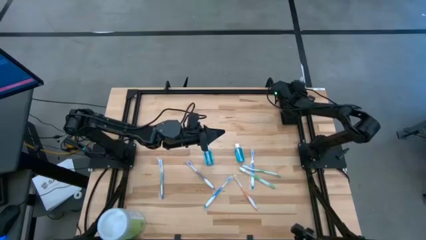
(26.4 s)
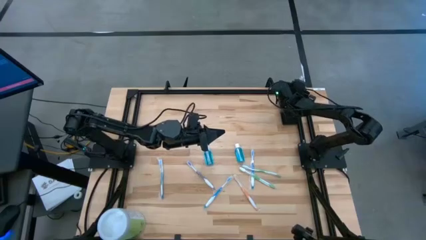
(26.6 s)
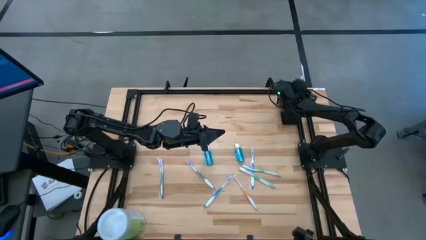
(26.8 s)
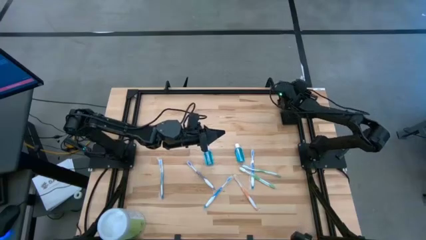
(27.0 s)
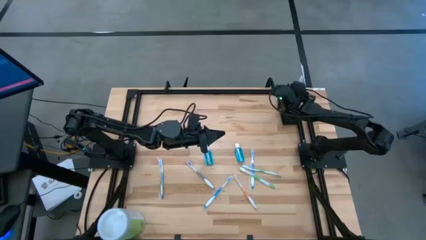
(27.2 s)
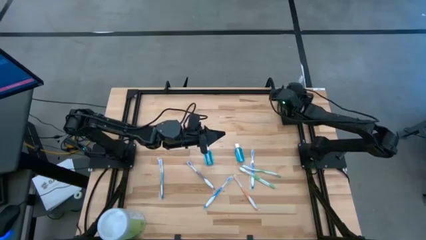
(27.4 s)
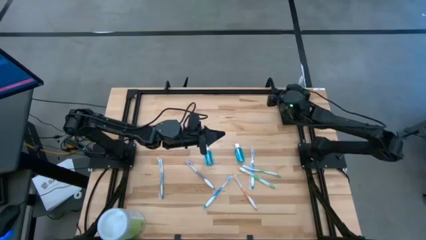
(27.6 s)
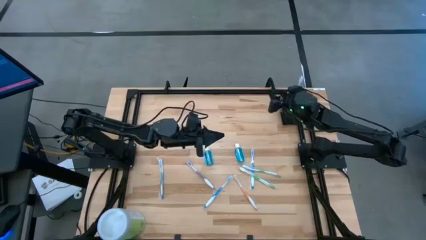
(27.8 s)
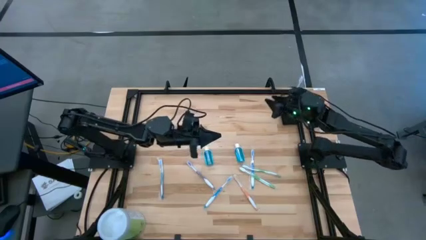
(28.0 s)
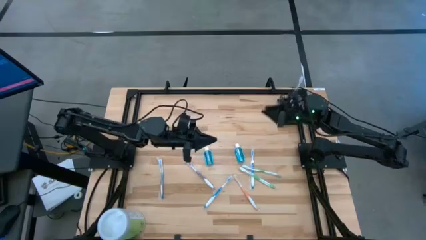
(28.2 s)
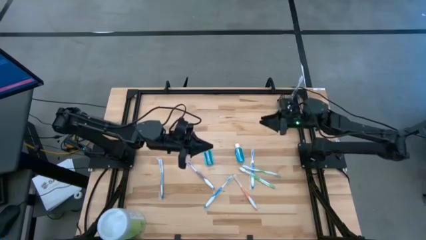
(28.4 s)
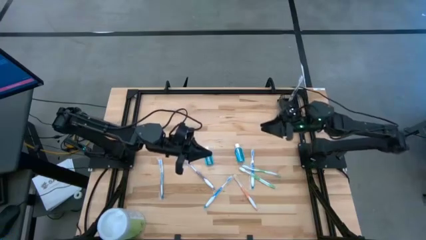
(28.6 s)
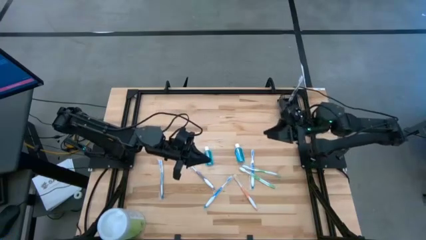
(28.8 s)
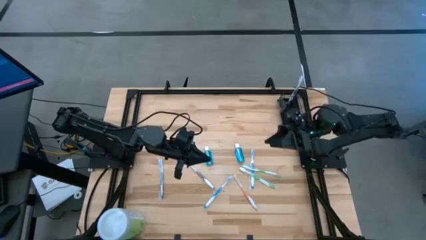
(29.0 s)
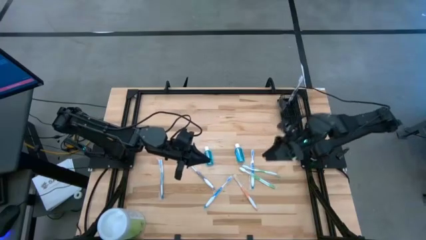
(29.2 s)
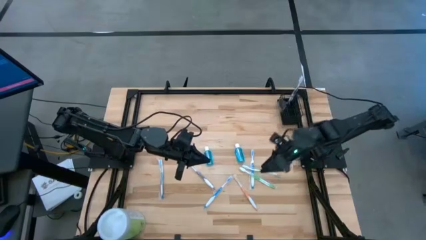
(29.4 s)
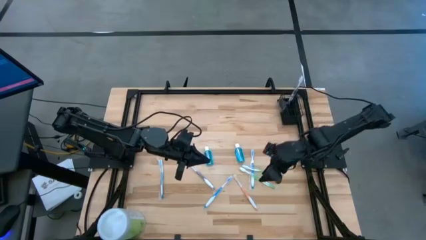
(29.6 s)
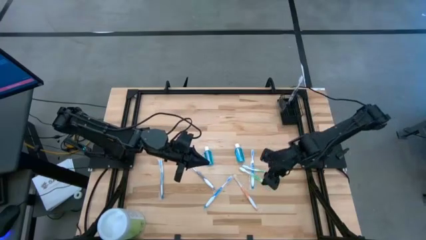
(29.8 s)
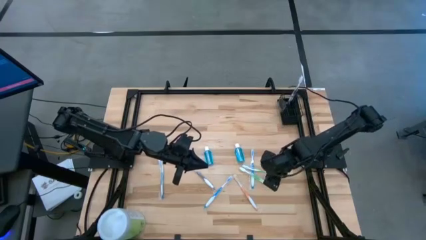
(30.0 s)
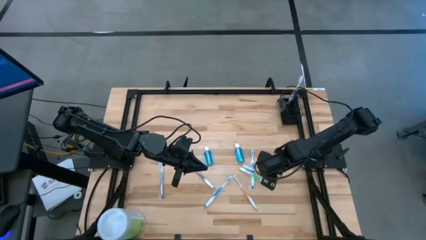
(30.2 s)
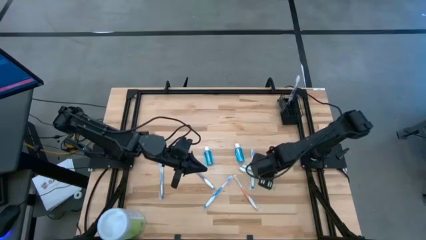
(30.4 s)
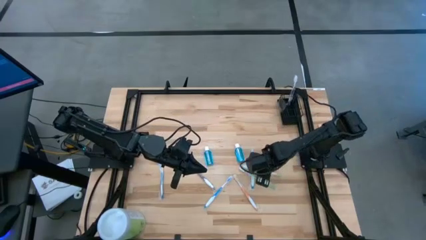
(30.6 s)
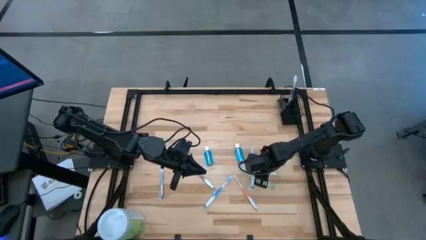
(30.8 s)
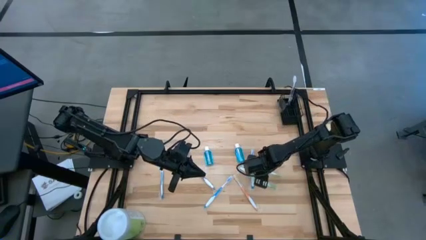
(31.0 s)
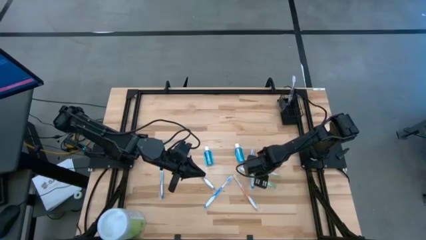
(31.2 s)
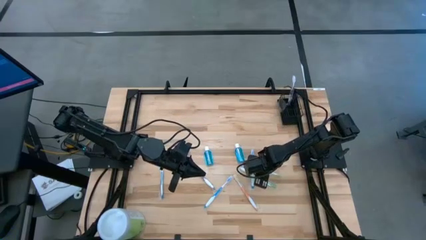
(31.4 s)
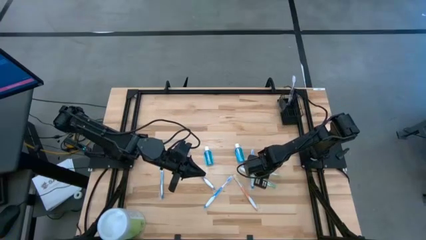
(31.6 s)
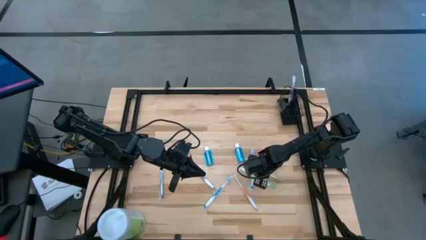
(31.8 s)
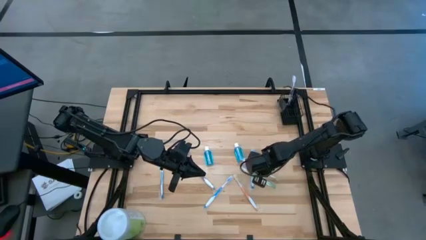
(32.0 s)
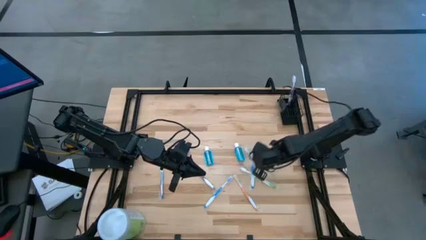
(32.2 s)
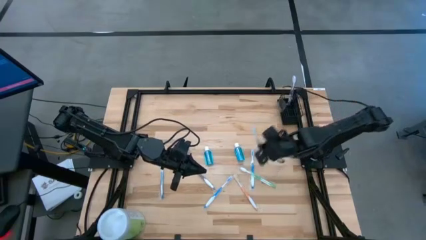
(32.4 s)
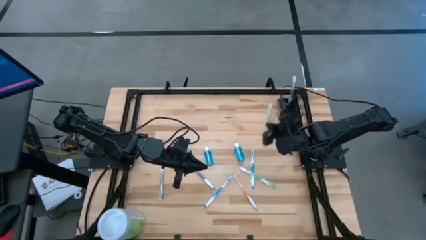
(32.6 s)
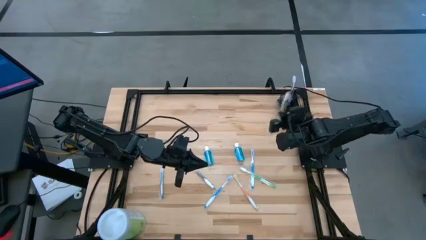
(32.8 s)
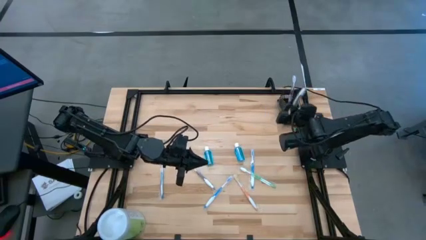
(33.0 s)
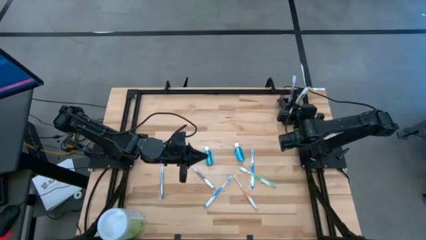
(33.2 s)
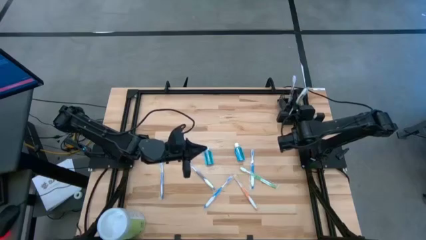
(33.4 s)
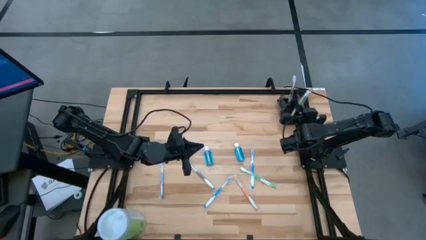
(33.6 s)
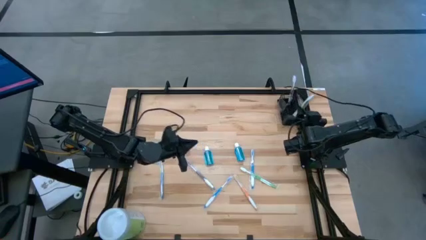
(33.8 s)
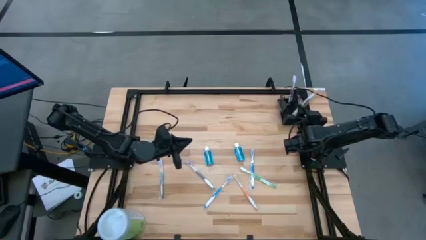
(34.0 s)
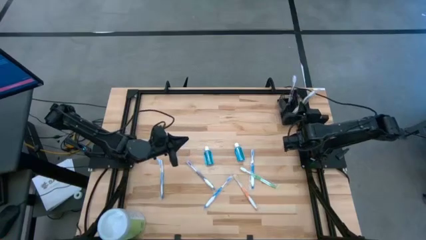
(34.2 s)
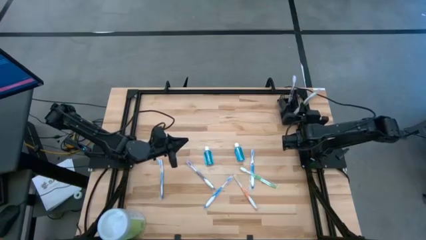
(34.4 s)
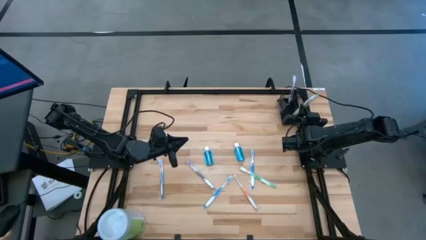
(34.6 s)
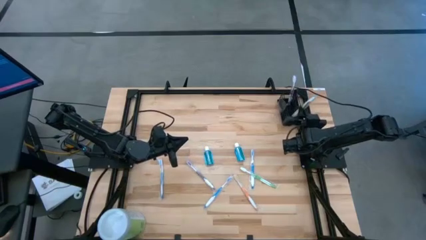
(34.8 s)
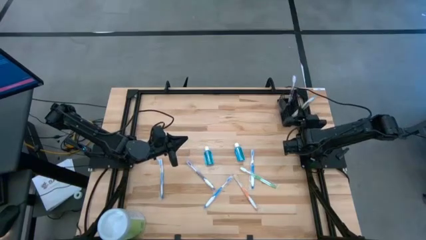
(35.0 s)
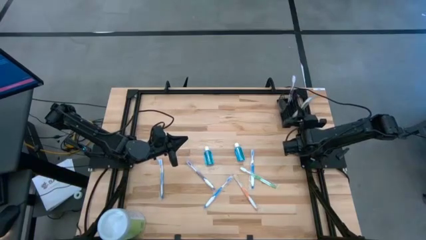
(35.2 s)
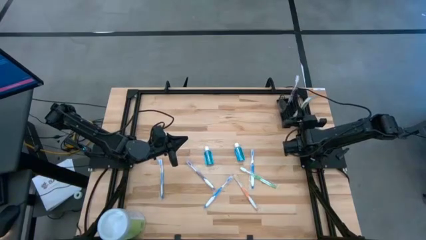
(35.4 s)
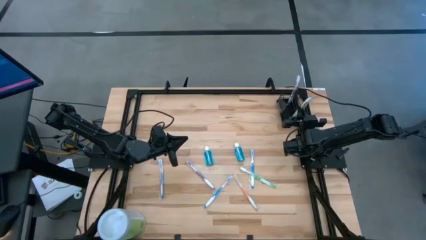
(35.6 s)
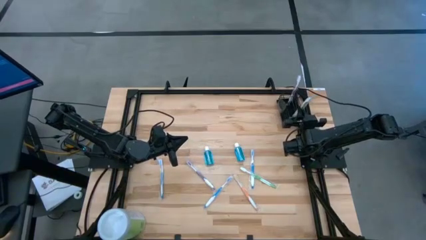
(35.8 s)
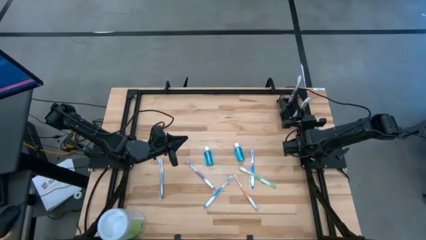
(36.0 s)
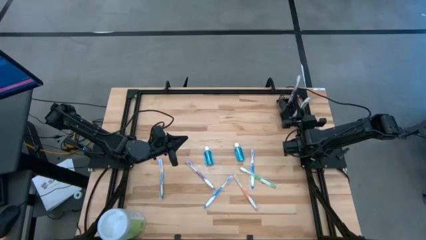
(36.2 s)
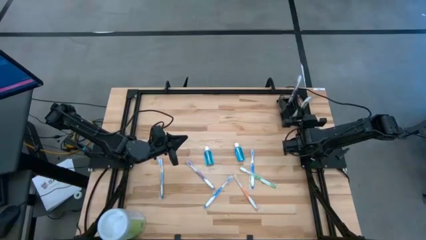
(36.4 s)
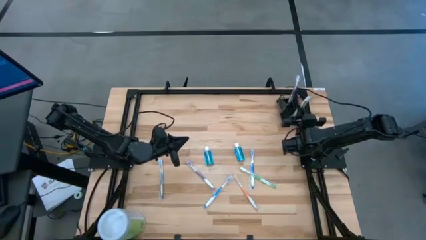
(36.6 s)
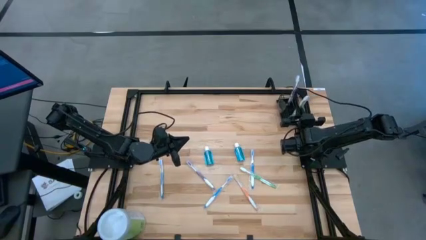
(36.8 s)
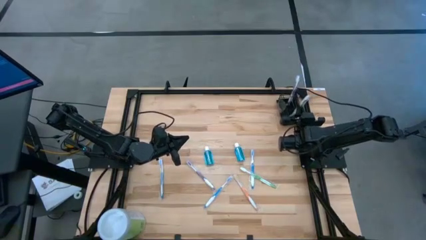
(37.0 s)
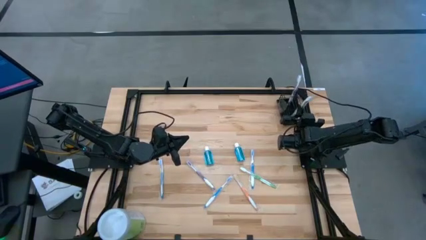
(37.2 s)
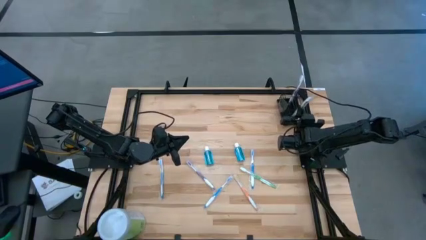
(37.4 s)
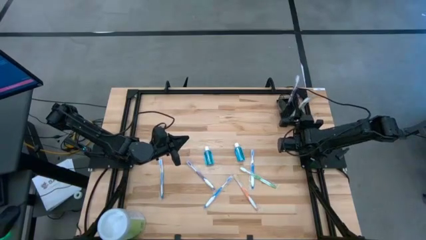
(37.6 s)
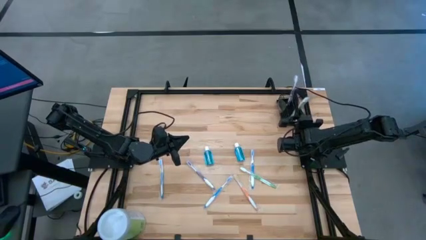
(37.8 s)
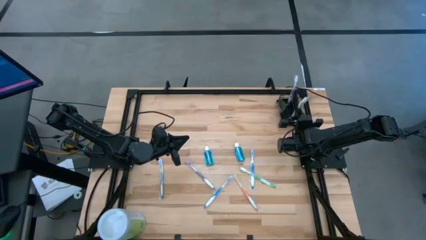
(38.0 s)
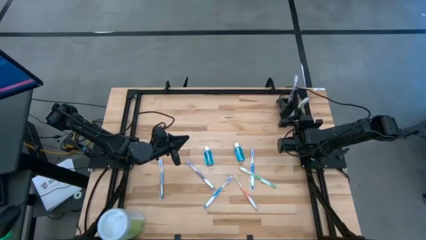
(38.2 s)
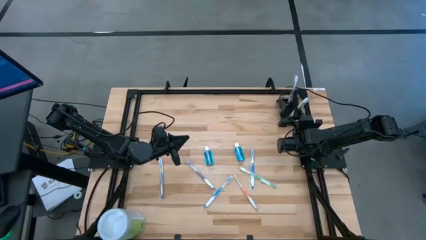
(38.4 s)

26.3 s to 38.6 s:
Task: Pick & Place toothbrushing station
Put the top green toothbrush into the left section of wire organizer
